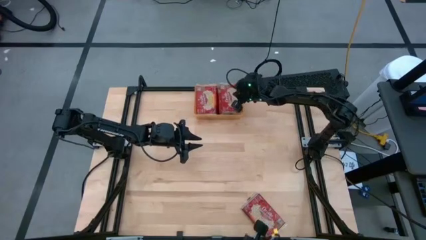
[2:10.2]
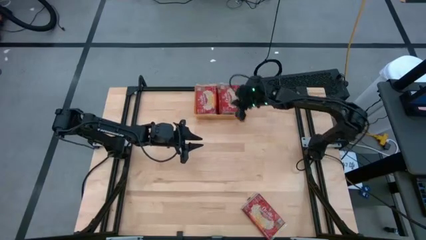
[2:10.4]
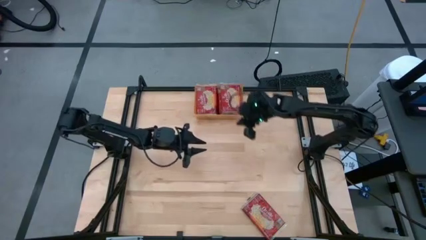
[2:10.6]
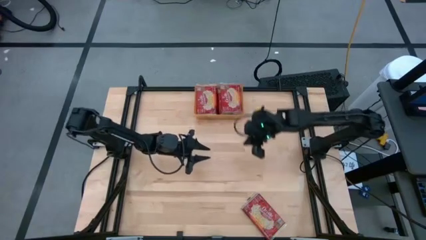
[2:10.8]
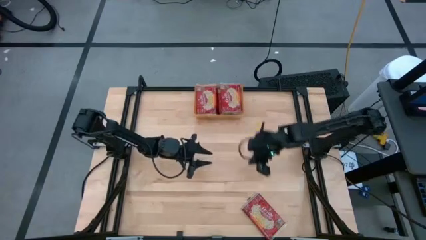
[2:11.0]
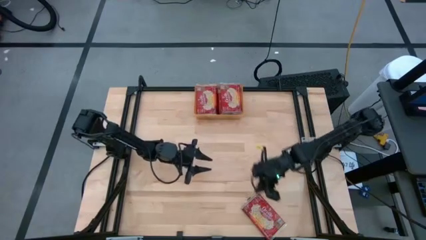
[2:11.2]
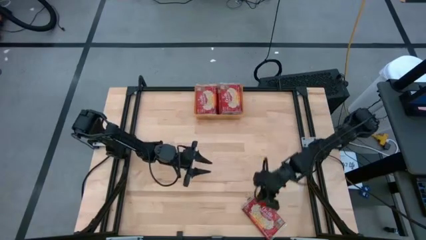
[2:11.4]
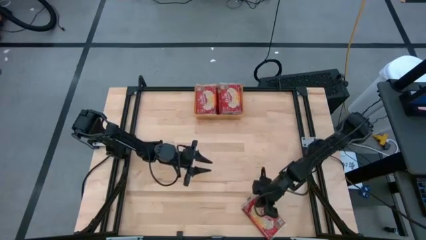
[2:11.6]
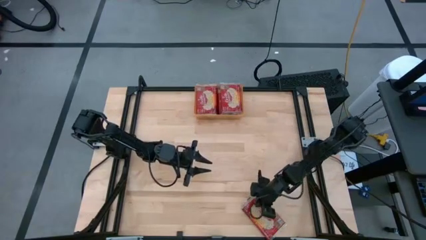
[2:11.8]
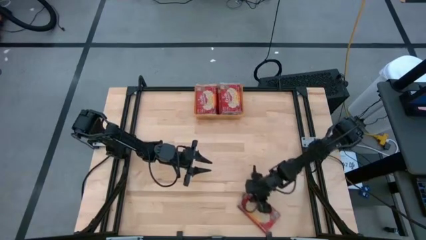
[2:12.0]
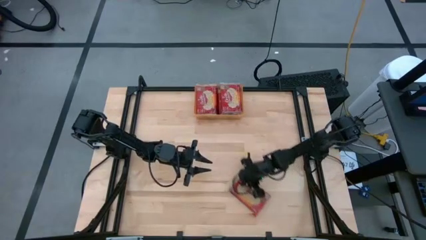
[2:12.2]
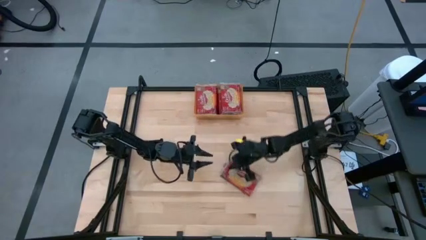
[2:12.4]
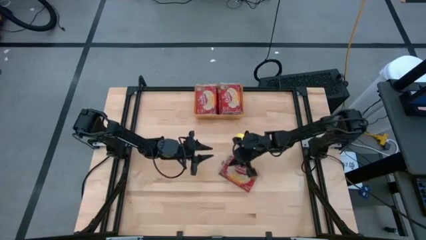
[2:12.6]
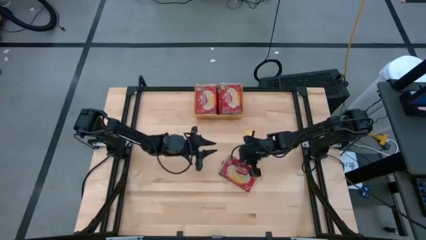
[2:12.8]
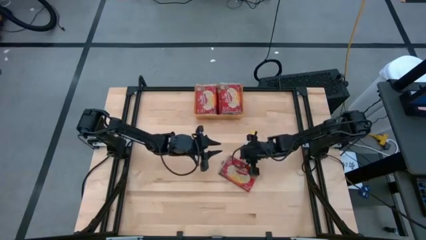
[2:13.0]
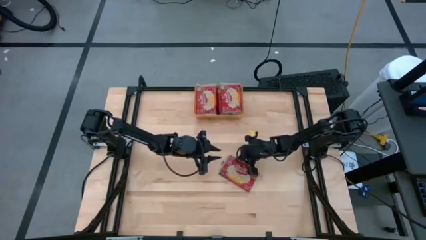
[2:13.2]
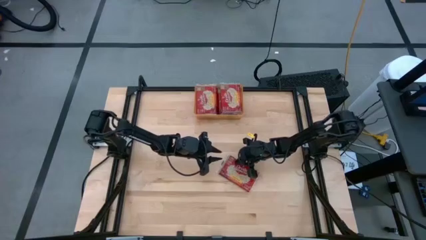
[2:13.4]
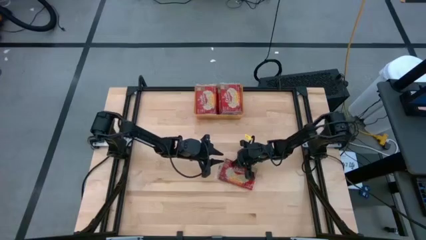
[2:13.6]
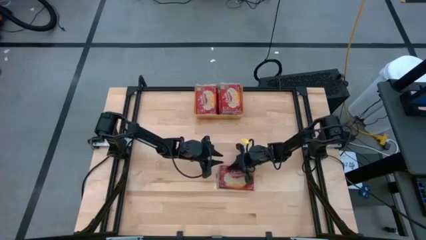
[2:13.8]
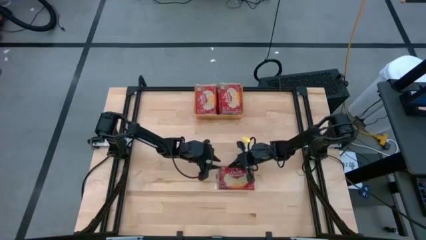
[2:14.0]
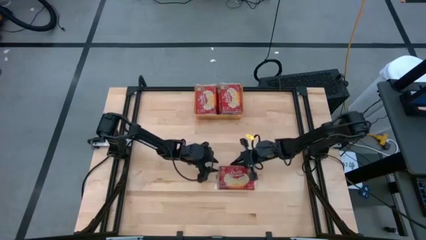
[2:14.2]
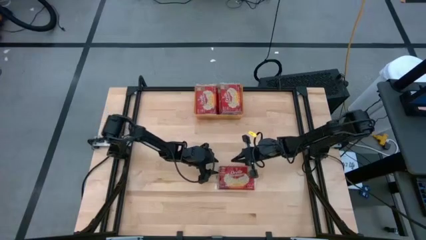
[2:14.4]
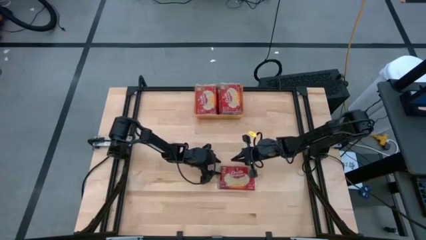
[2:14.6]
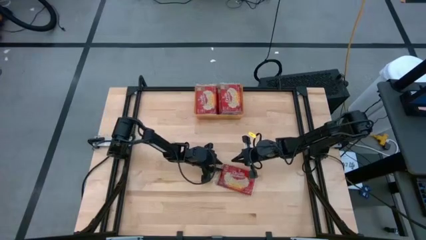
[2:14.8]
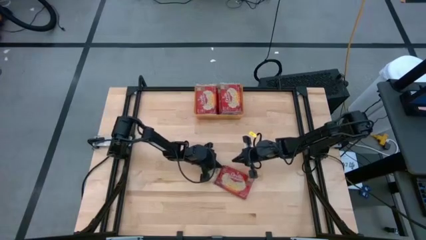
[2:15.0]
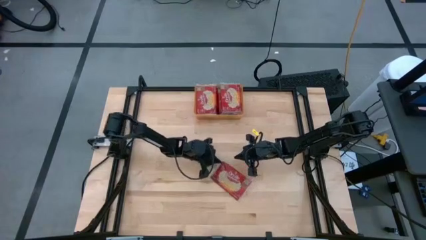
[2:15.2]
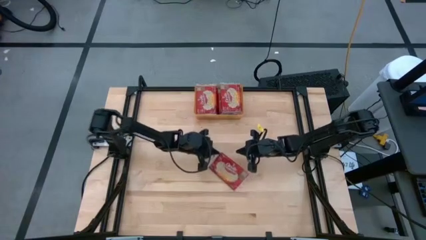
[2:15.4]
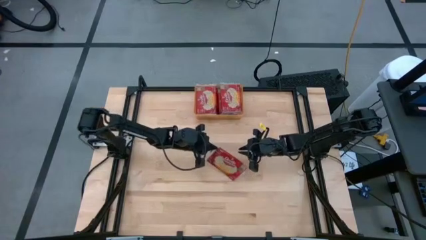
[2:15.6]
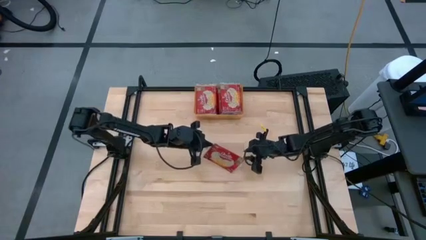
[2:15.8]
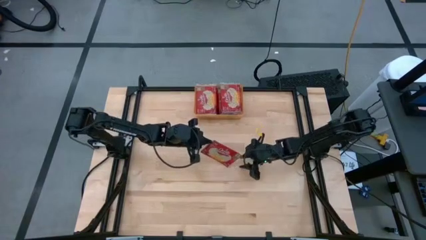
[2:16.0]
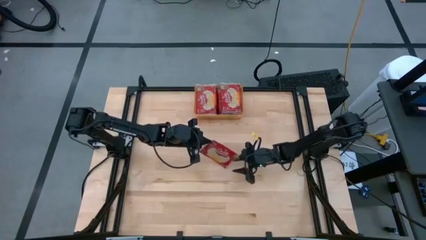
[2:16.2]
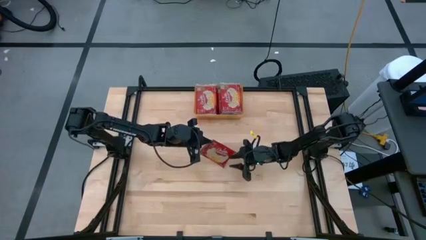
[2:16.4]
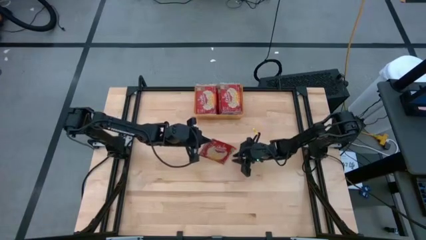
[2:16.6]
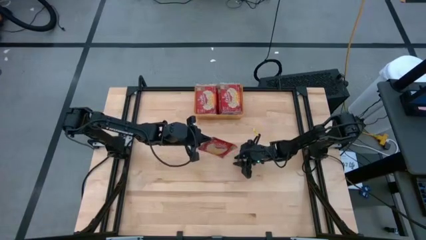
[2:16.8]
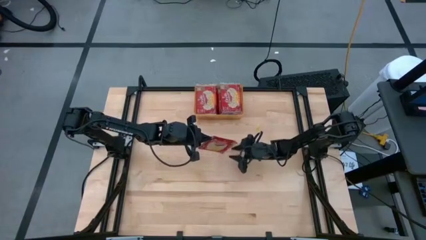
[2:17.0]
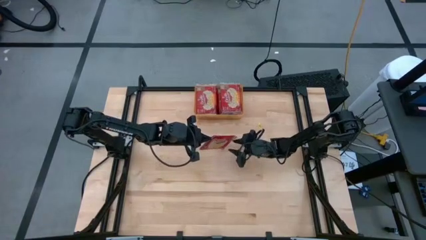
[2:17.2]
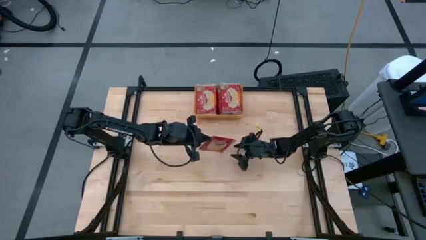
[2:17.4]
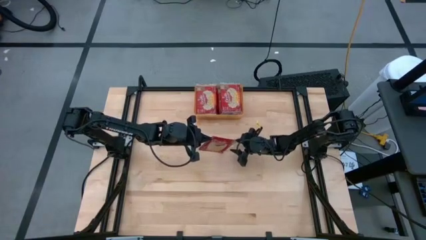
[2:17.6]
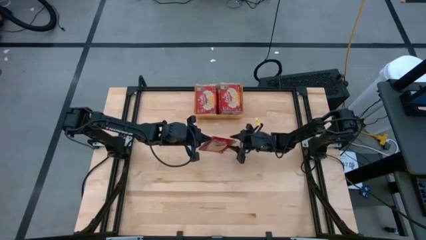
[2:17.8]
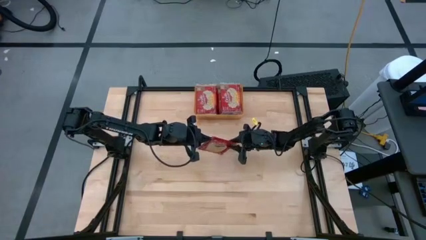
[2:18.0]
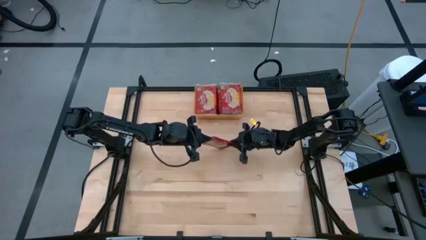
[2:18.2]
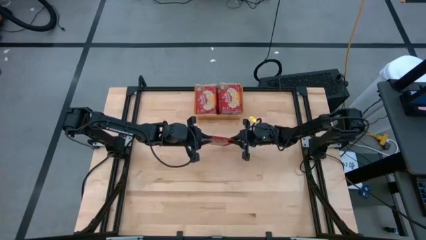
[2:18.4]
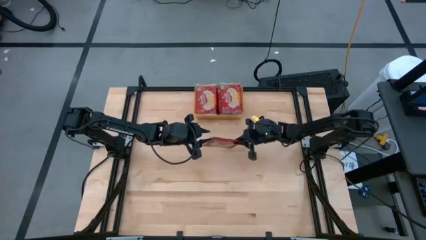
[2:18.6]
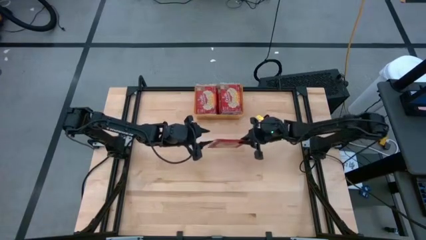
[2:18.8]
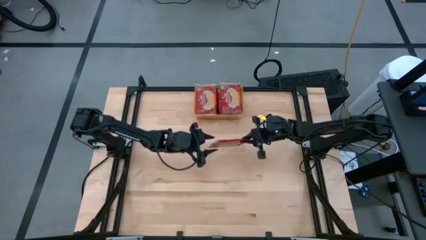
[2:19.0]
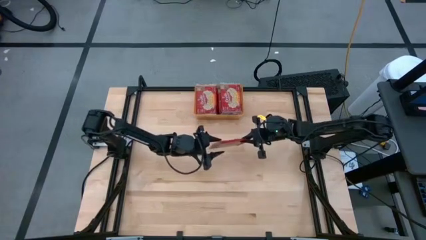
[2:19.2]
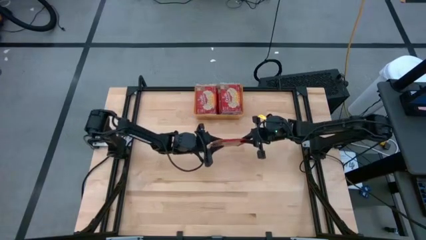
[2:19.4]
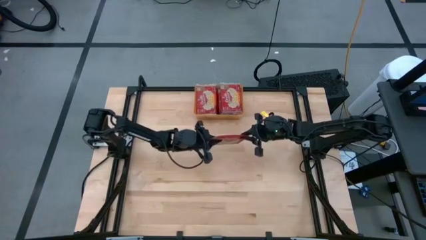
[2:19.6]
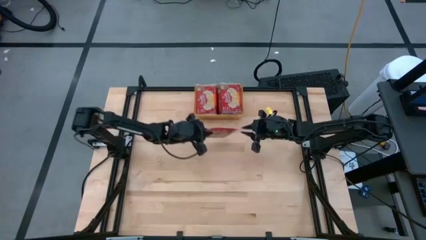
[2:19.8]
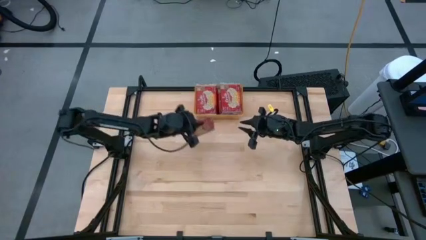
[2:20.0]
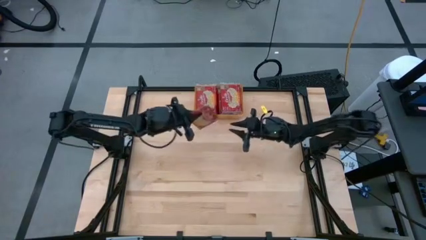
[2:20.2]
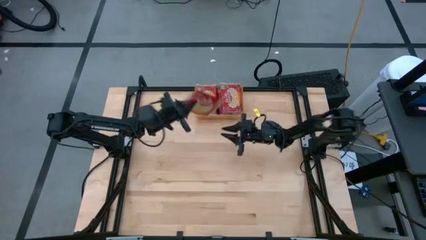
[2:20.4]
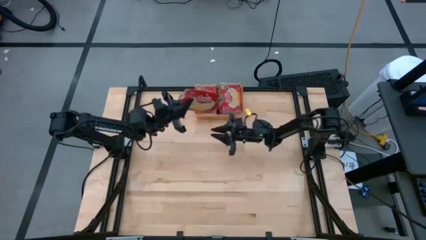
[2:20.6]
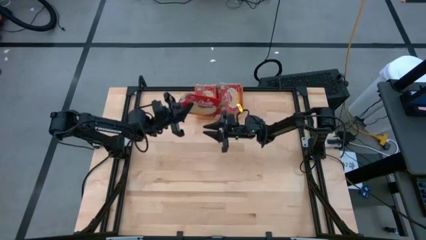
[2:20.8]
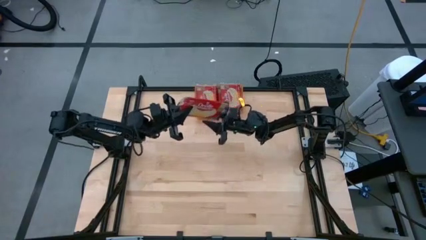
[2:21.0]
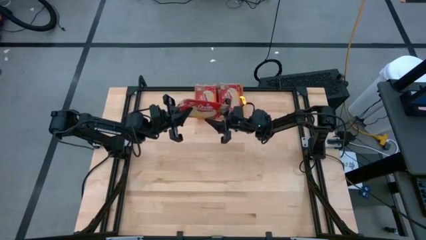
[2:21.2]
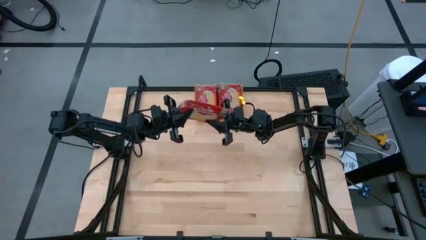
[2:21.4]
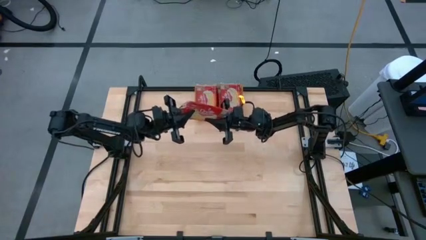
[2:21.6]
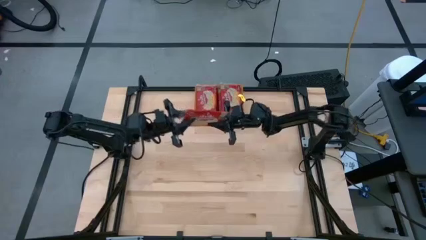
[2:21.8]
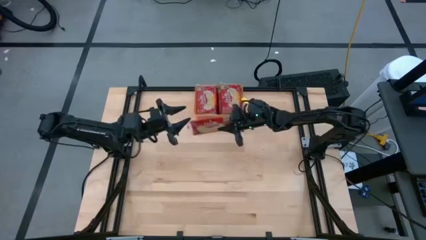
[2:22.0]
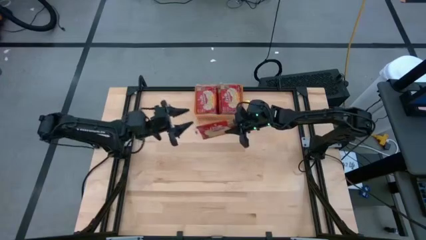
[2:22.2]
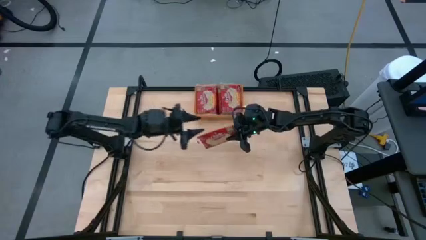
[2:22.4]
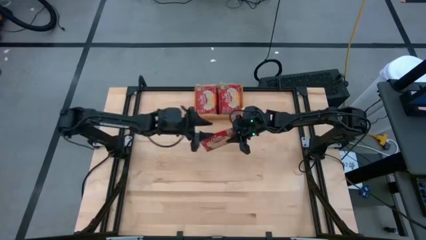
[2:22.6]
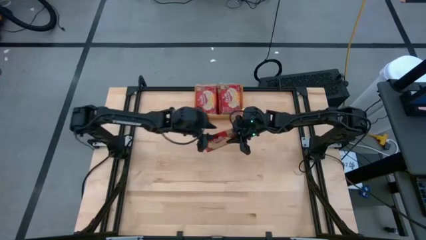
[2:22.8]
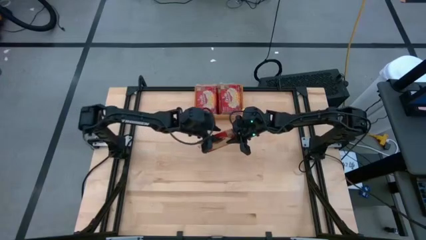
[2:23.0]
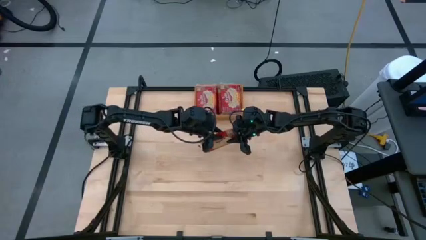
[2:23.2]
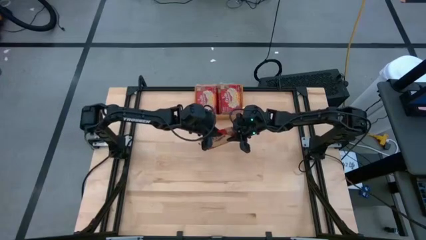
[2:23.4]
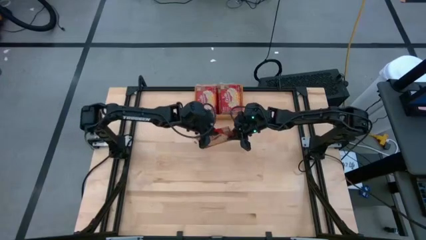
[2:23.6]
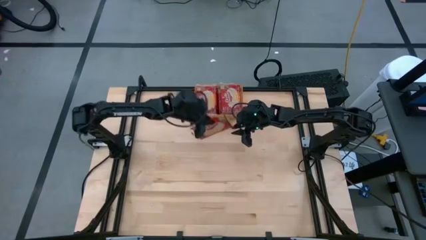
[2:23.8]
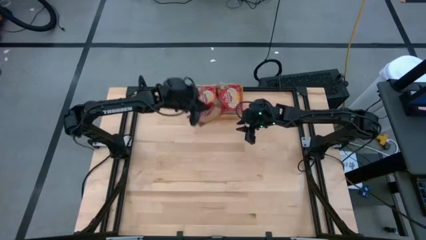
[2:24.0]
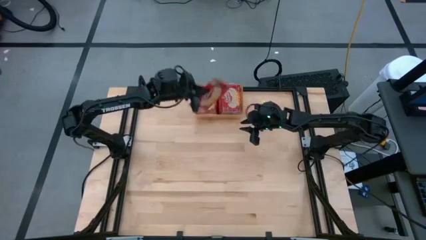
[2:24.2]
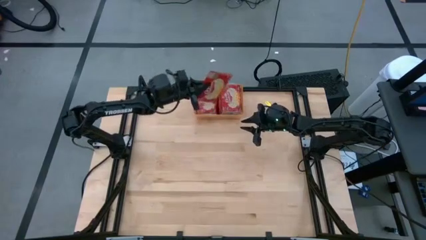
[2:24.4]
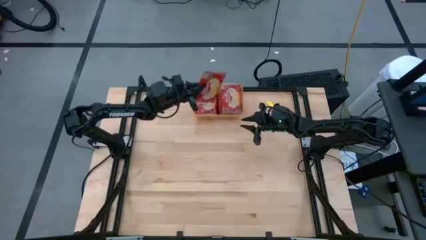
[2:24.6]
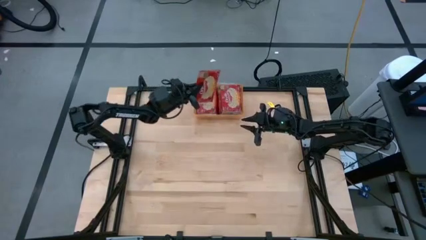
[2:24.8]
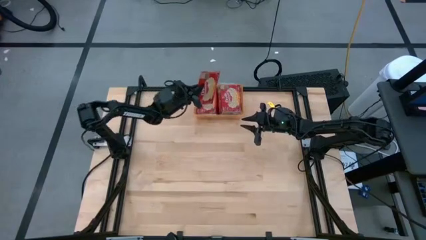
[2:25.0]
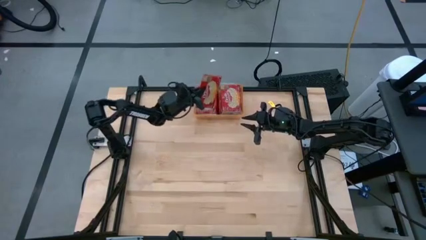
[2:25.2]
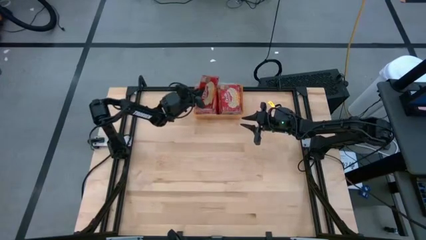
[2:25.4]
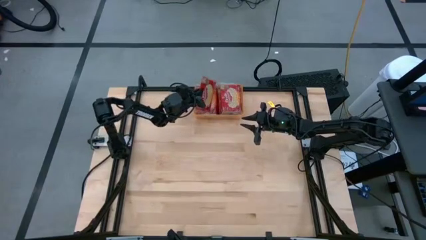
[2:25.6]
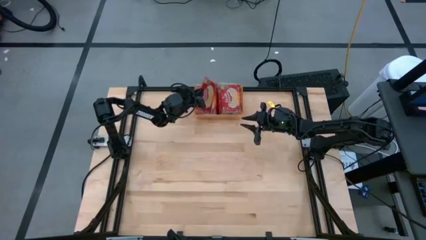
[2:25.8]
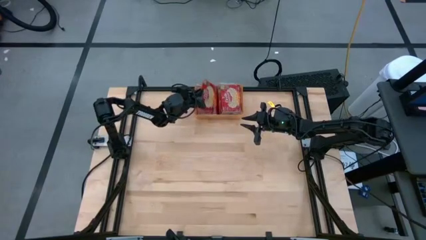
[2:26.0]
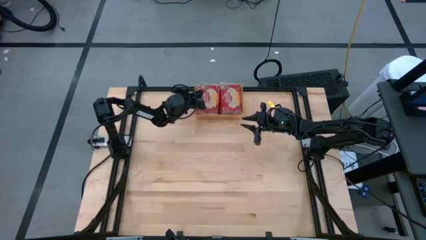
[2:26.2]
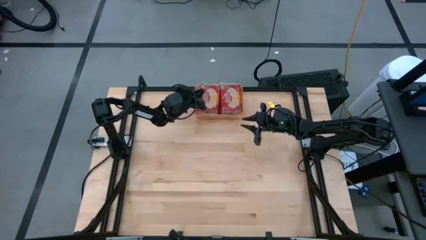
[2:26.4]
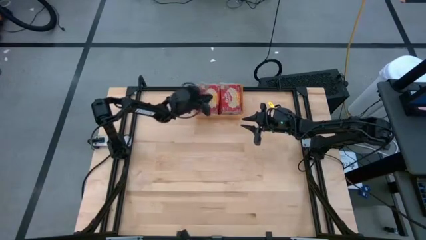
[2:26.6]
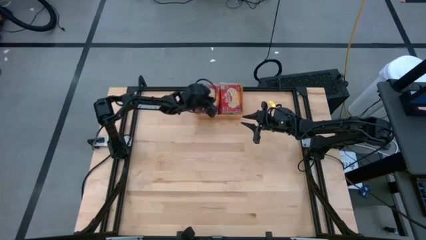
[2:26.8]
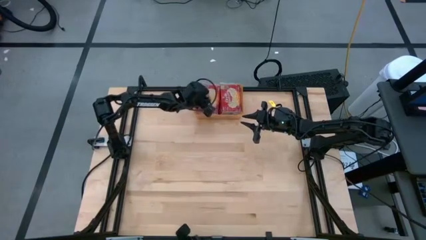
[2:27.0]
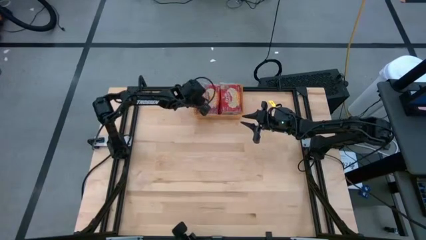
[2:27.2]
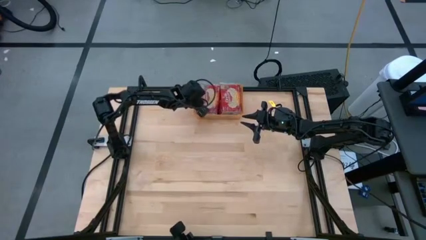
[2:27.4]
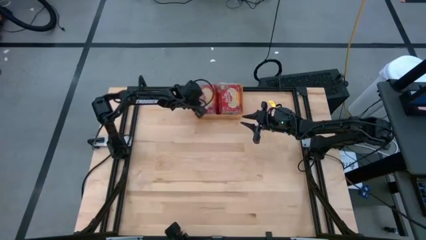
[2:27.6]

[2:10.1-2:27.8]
Task: Sort popcorn bags into baskets
Put the popcorn pack into the orange bin
